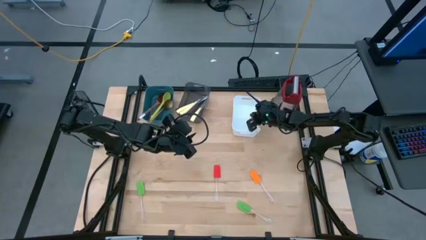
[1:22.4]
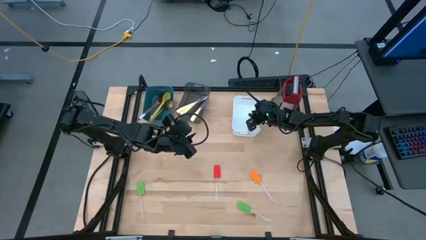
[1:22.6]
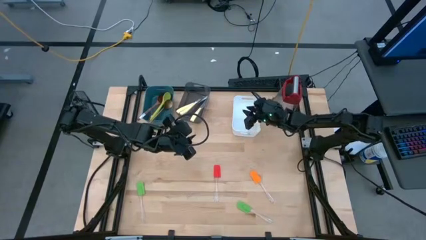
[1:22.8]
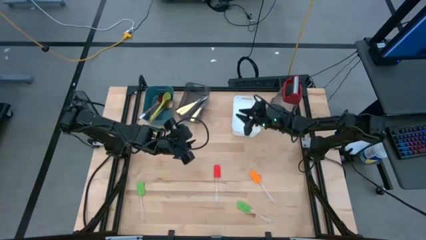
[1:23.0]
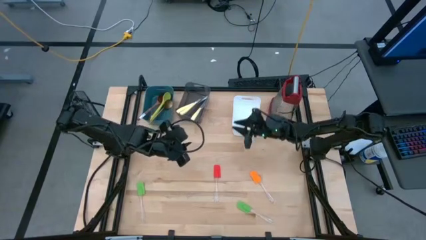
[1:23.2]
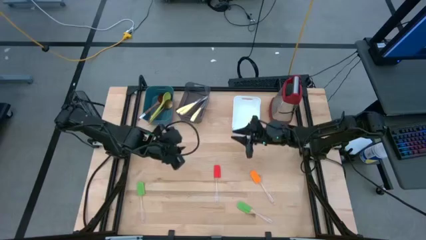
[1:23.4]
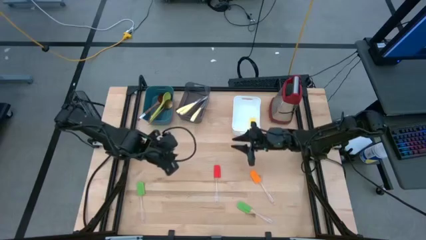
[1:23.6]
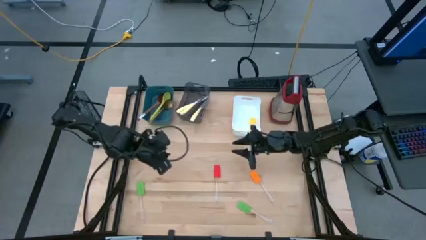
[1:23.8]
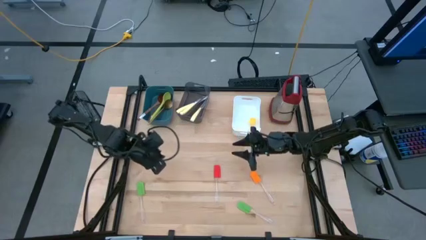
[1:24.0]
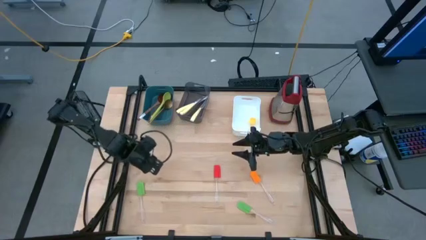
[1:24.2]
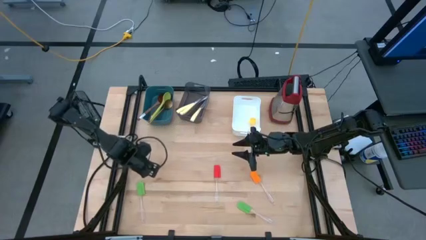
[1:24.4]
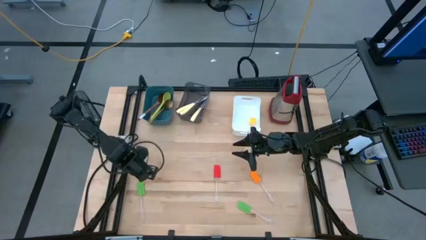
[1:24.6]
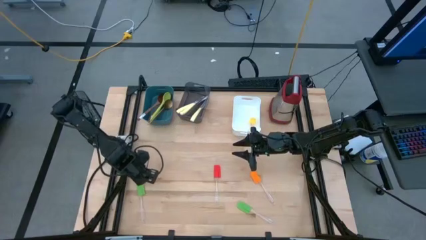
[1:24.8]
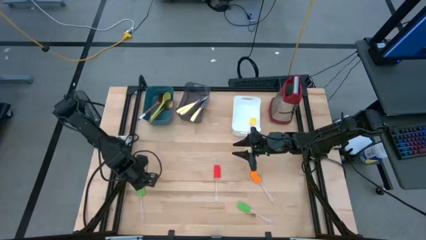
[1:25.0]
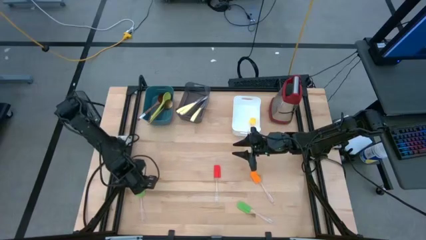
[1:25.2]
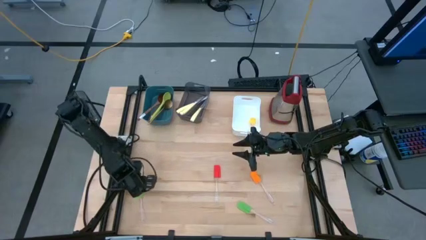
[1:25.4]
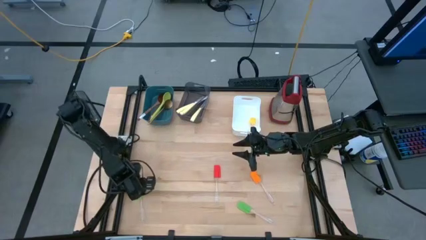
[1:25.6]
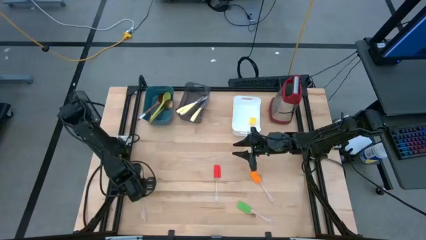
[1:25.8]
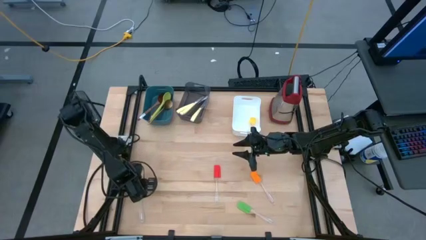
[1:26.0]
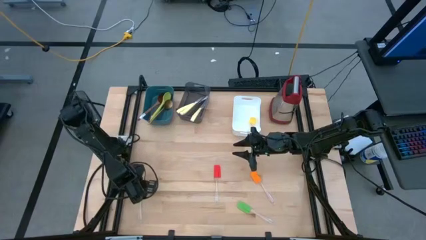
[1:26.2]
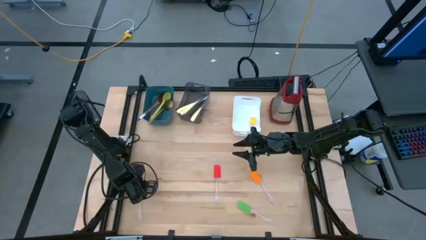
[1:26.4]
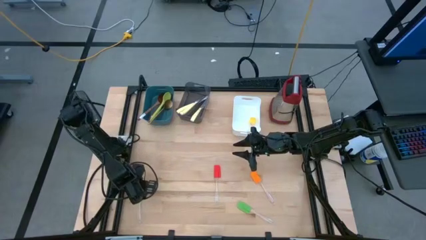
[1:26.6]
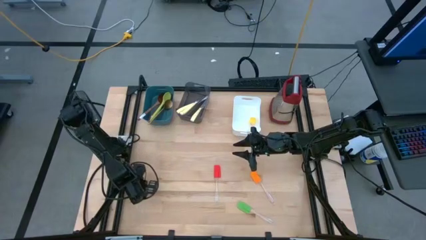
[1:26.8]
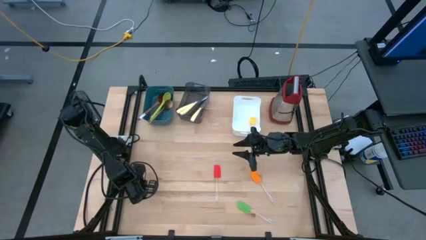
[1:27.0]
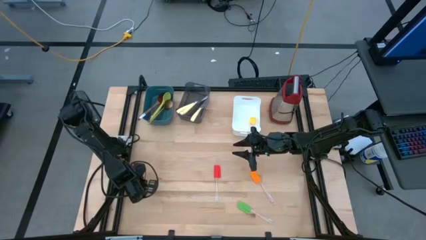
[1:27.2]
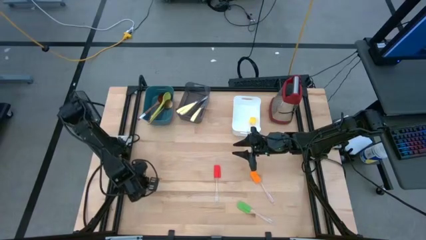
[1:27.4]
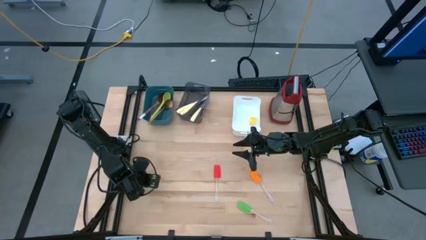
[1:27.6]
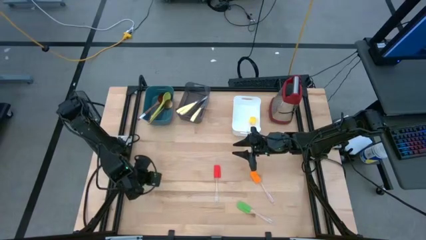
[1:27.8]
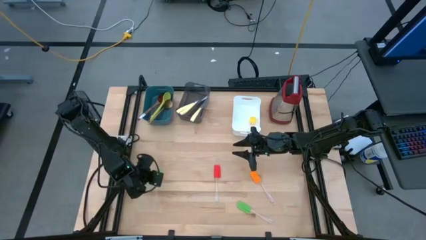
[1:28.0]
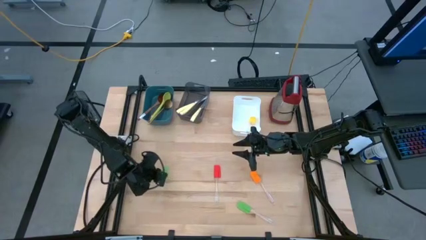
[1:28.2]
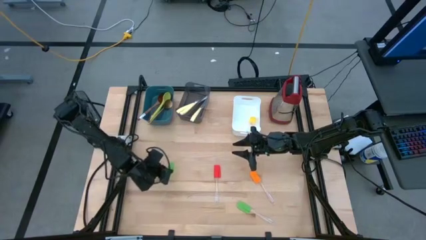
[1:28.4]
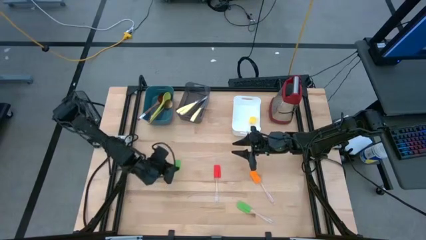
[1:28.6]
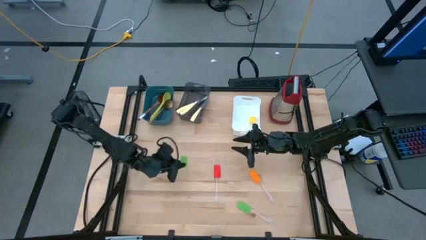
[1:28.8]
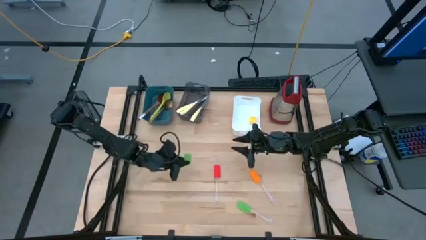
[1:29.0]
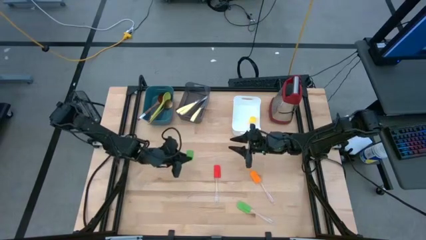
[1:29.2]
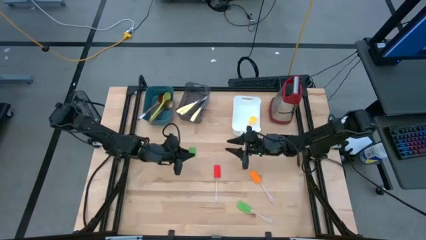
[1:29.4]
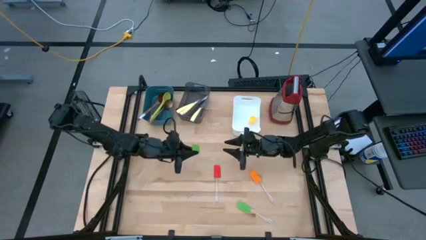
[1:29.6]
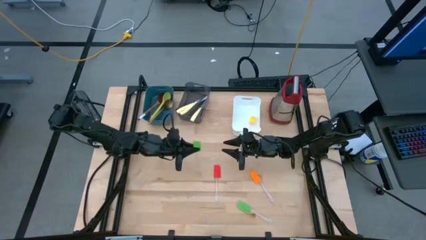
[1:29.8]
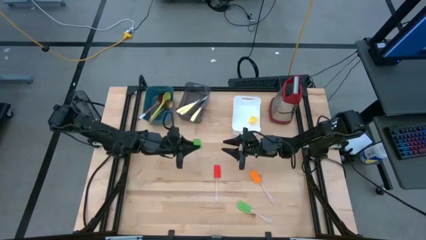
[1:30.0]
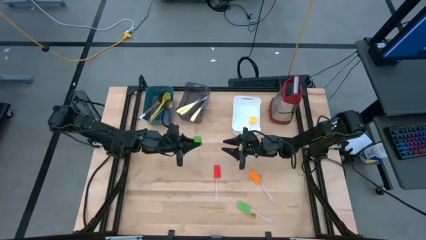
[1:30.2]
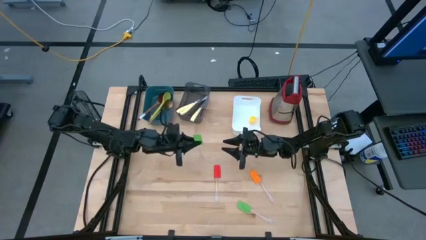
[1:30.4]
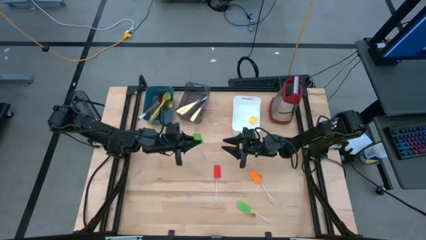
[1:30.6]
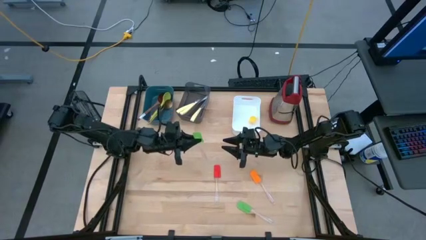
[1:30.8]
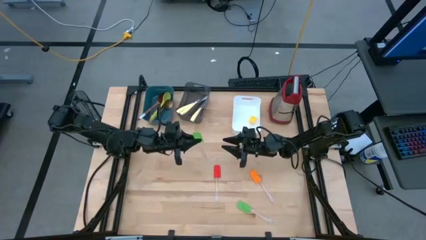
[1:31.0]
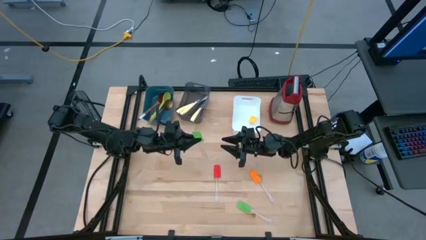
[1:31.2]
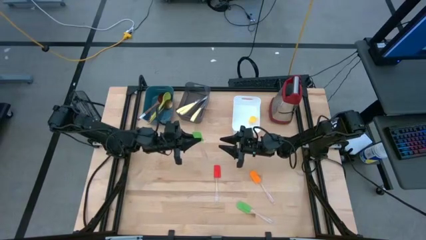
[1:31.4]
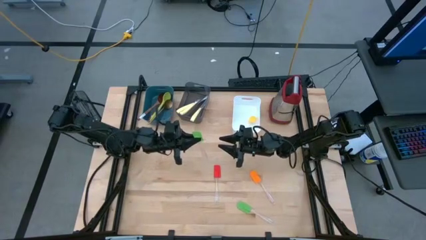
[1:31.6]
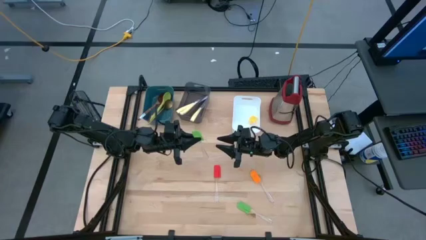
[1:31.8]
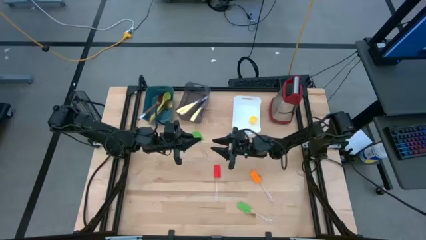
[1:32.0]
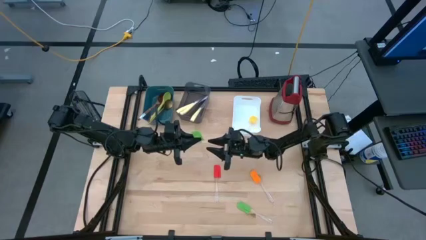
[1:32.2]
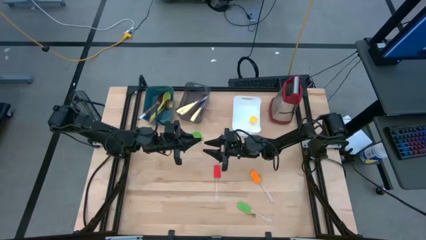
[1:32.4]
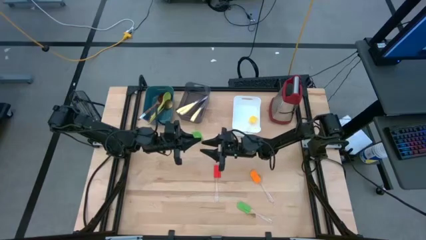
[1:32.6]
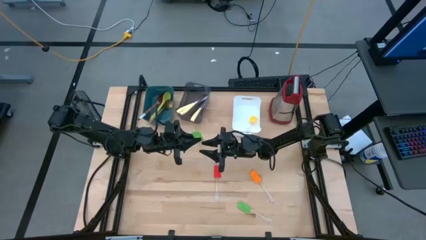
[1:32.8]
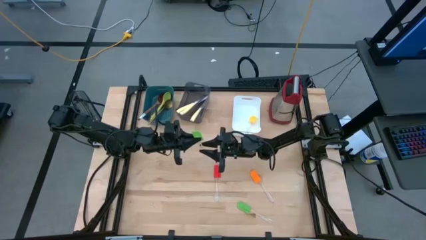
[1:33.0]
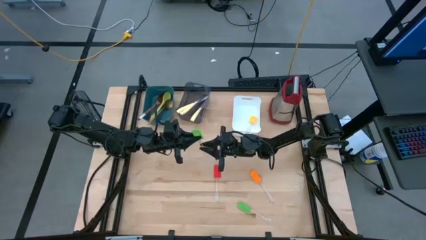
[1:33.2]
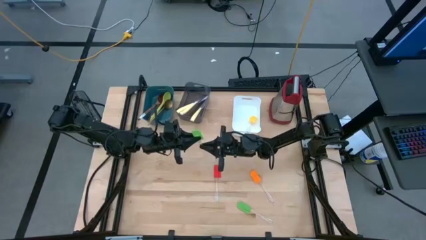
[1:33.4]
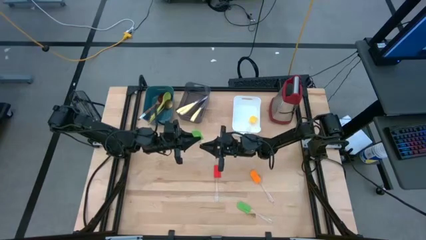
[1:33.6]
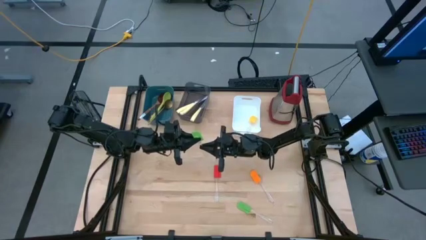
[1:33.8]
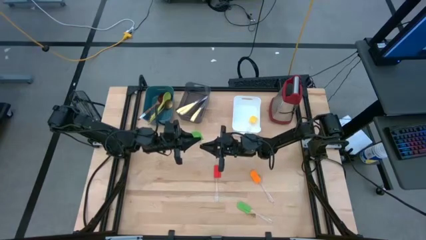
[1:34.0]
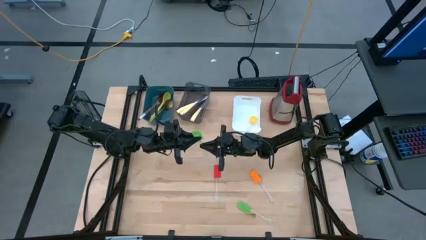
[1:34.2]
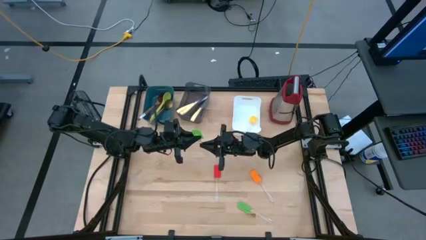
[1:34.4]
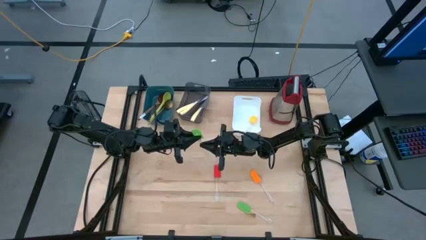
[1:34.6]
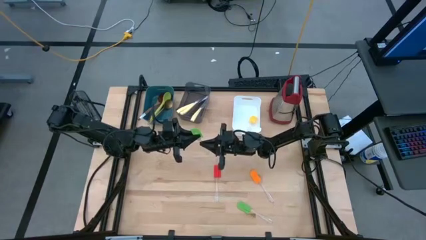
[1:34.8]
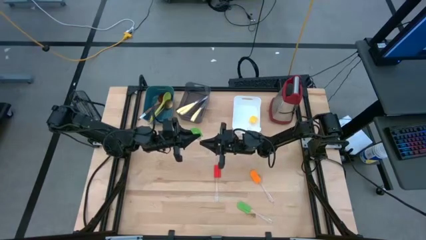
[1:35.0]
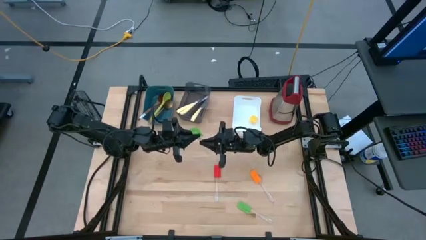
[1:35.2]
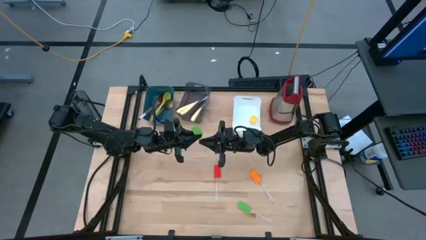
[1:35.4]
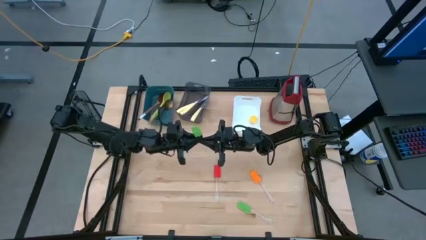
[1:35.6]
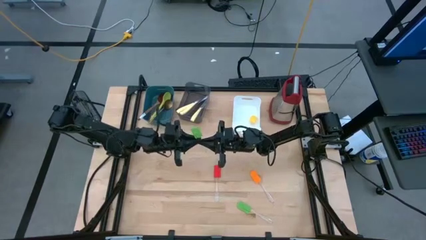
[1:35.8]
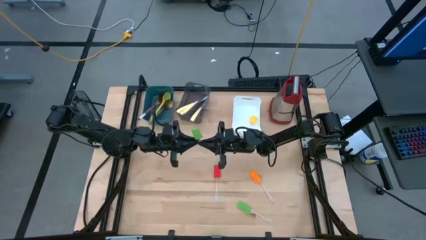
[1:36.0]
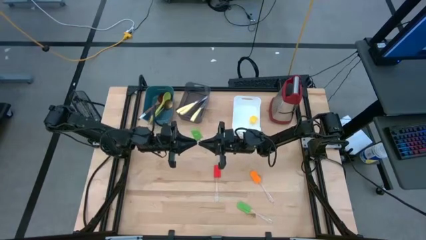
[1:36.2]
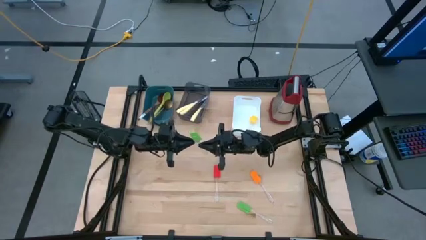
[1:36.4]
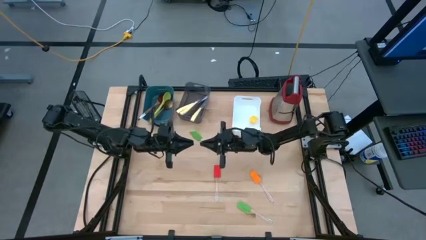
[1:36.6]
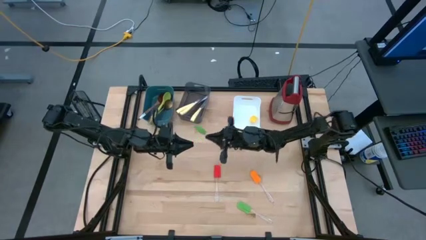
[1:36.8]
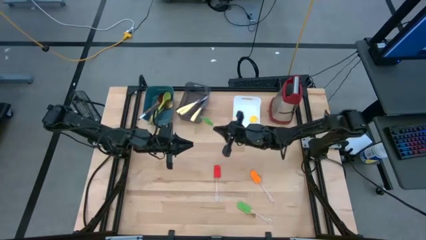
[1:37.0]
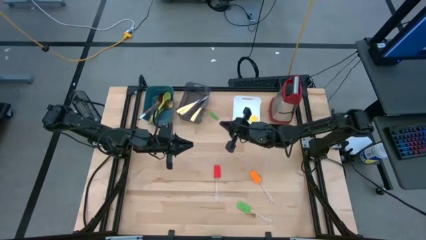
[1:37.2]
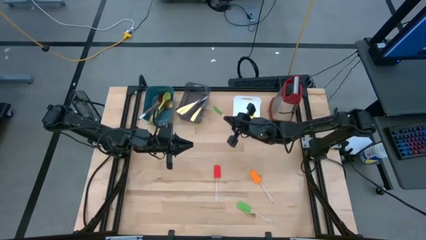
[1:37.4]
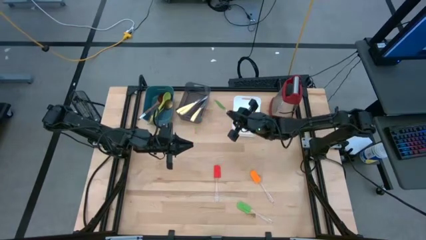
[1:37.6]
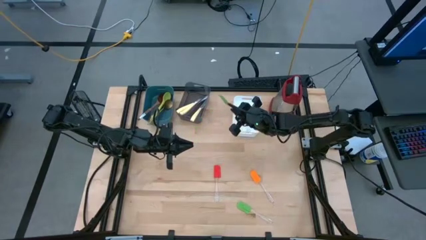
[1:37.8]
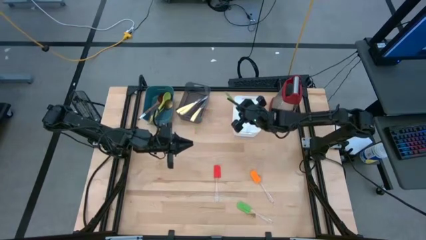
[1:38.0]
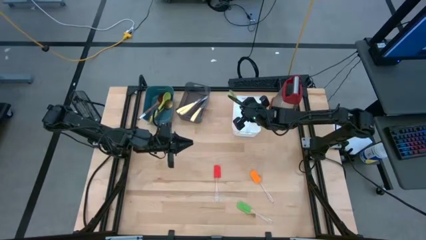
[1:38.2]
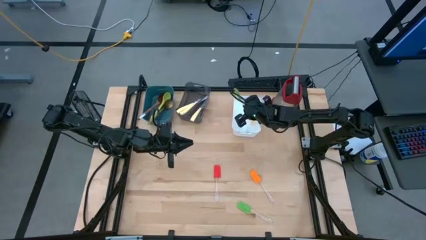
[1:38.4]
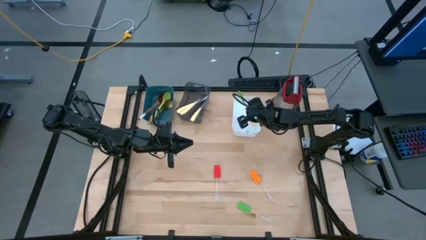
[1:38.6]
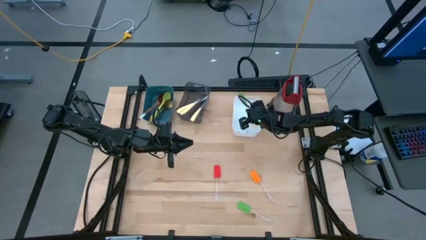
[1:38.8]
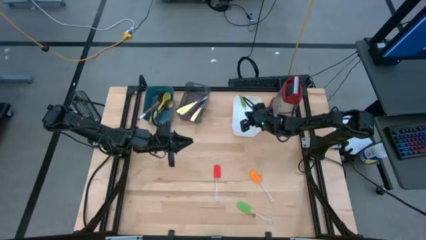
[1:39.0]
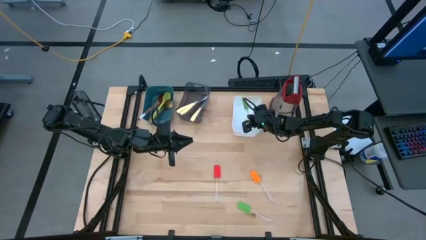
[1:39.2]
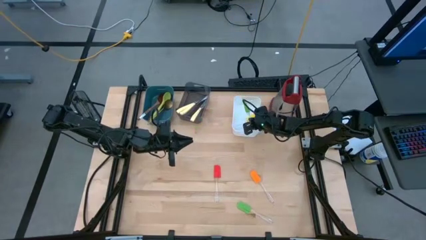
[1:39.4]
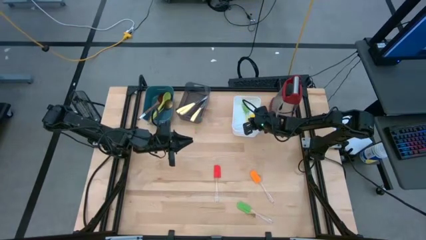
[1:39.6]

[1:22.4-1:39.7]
Task: Pick & Place Kitchen Items
Put the left green spatula into the white bin
